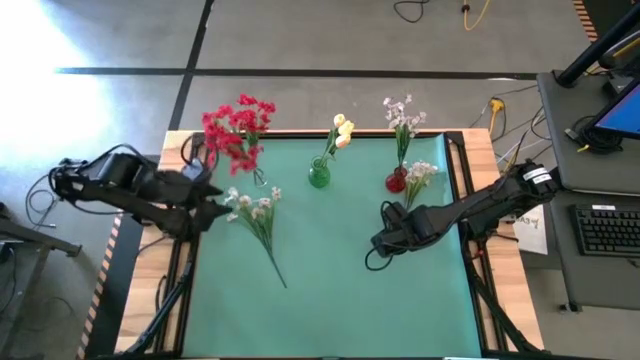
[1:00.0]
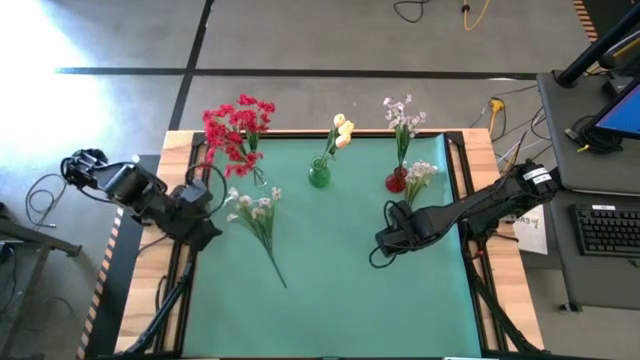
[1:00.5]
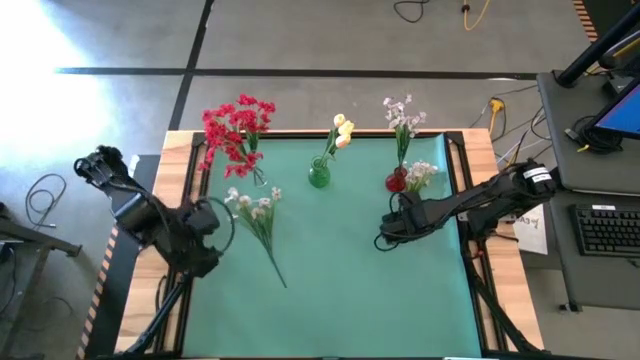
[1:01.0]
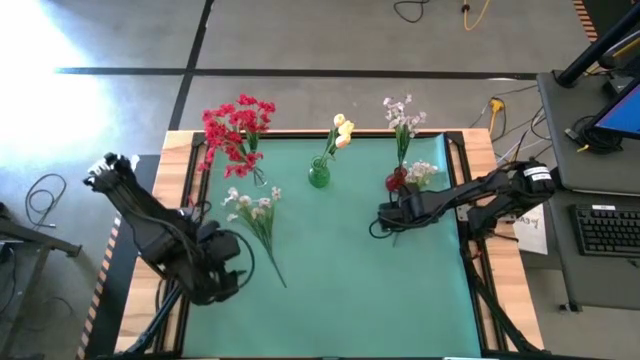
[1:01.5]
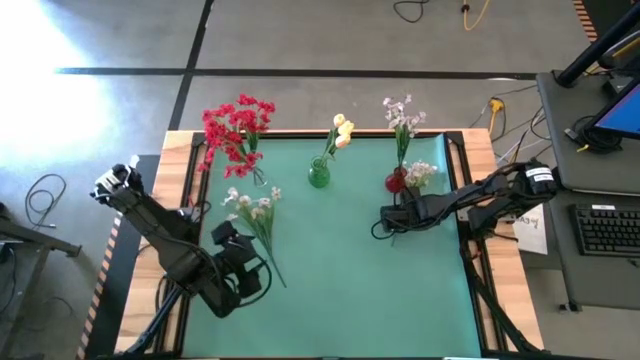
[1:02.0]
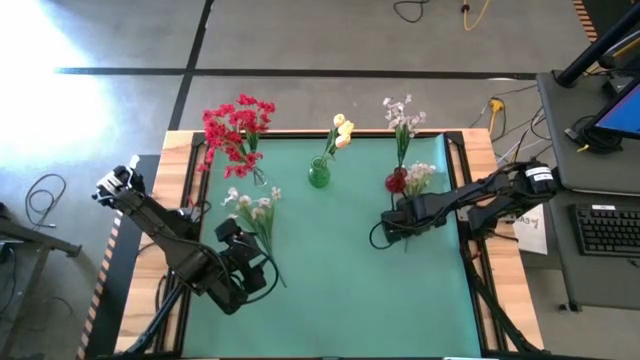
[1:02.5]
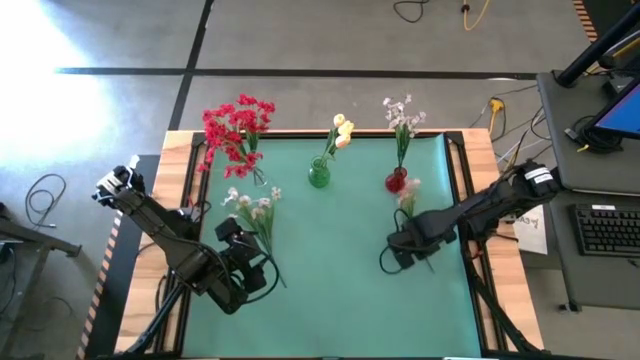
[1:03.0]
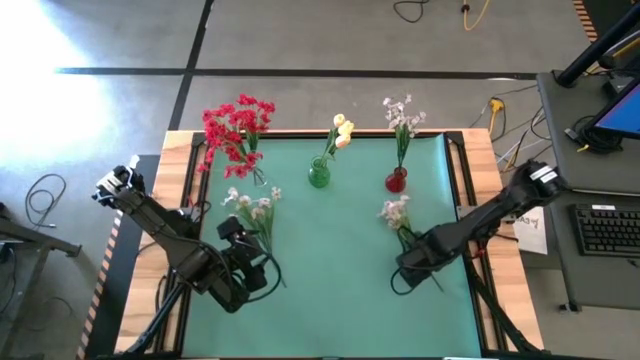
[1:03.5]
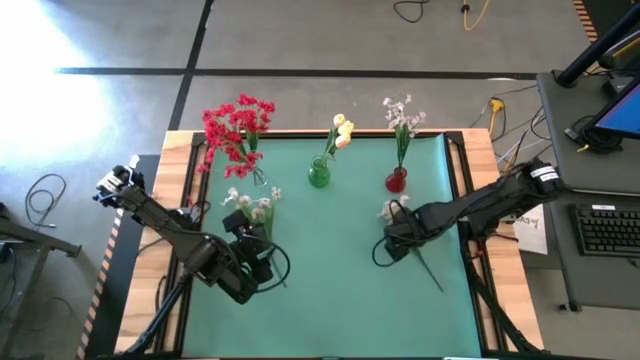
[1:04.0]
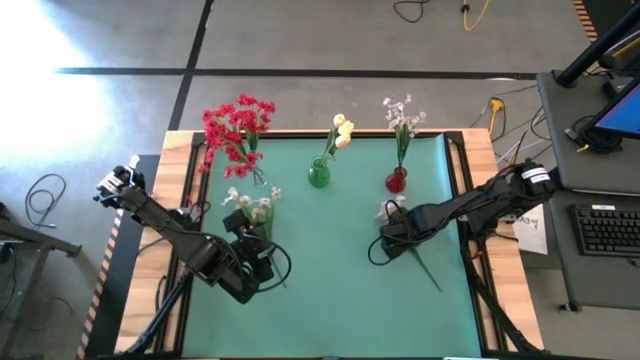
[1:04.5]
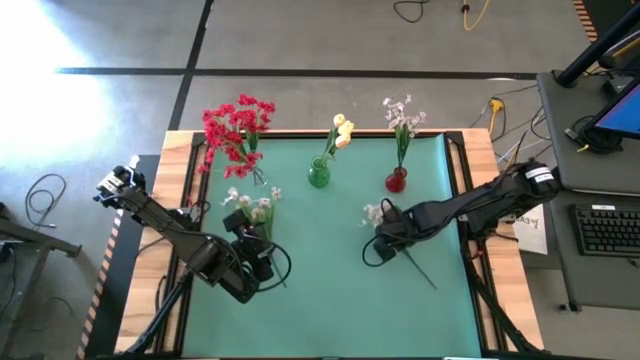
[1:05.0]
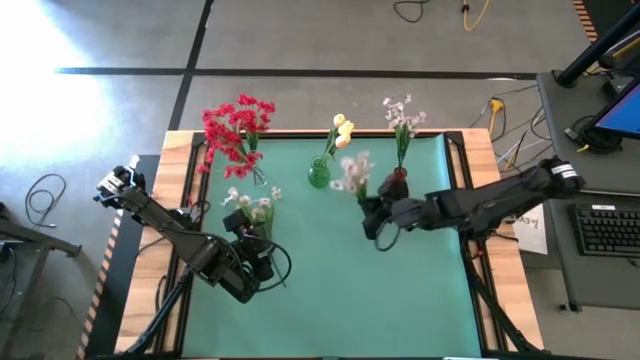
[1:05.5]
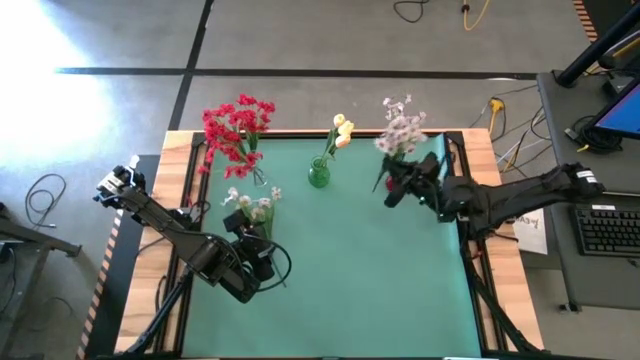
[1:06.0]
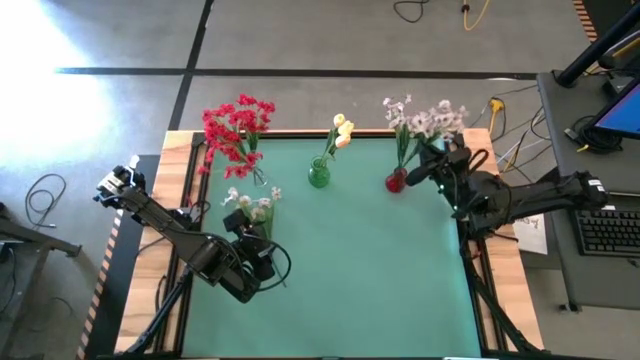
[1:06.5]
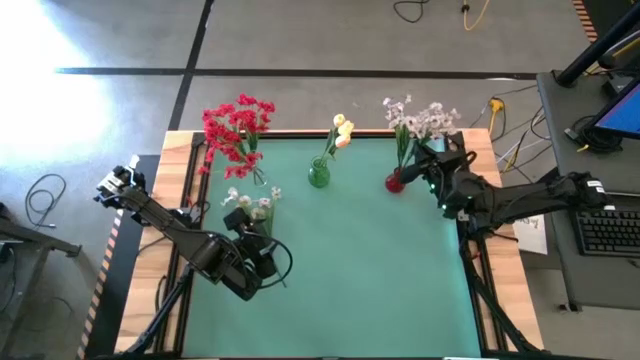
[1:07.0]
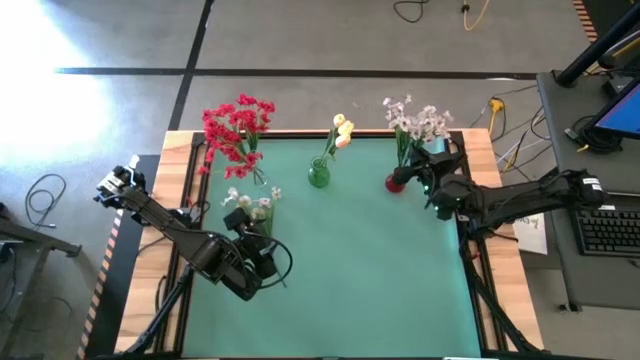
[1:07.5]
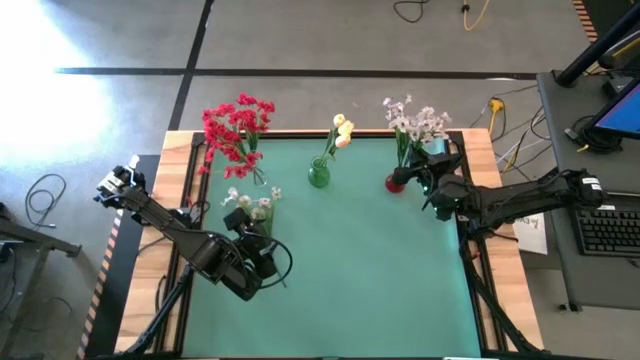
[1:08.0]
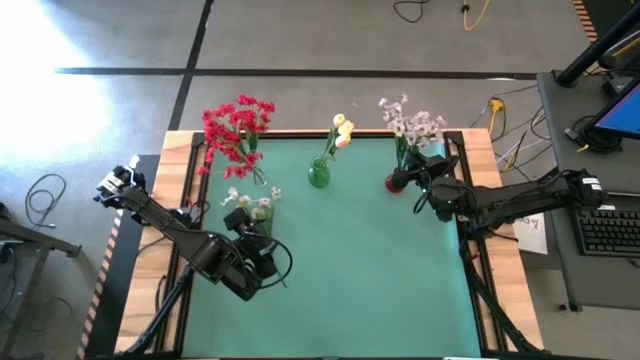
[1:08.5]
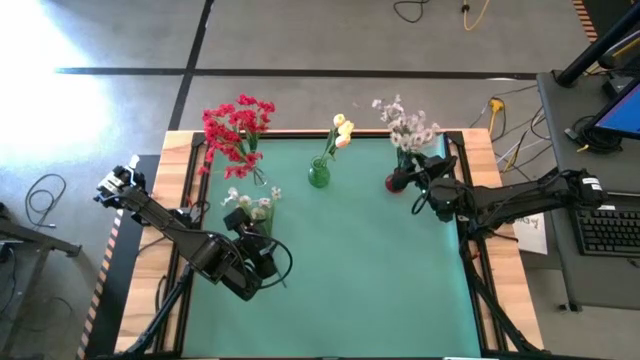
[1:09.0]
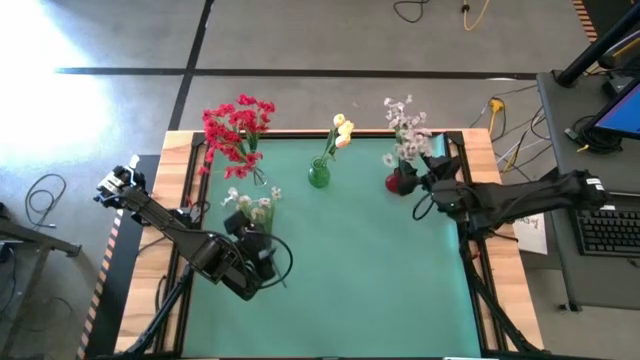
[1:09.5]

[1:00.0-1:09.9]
Task: Sort flowers into vase by color
Put the right white flowers into the red vase

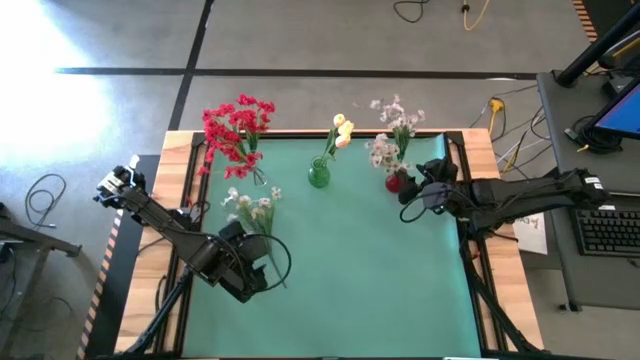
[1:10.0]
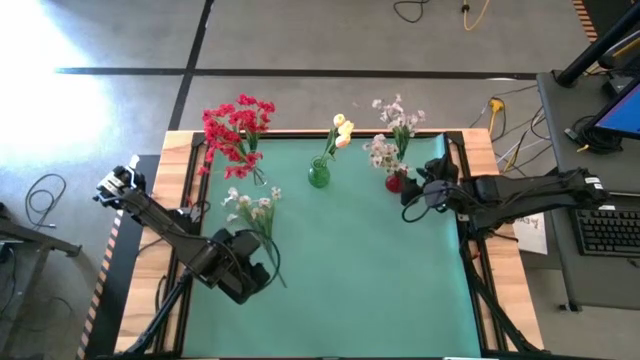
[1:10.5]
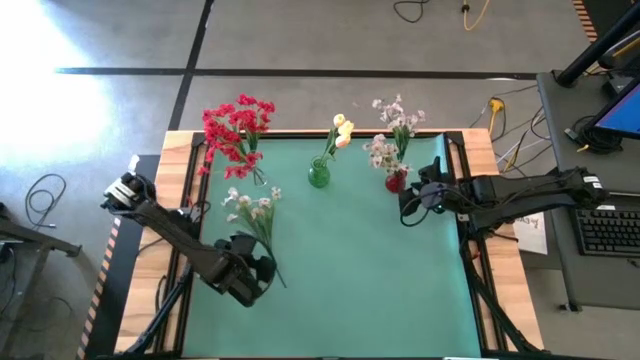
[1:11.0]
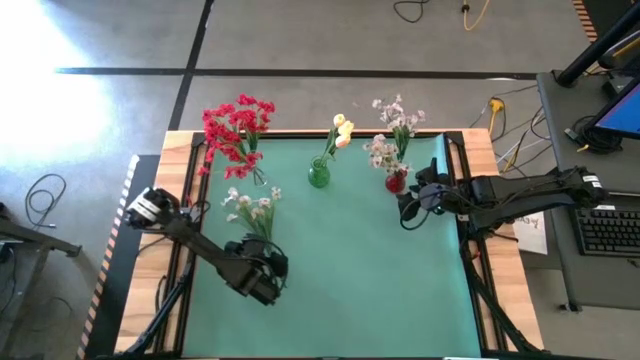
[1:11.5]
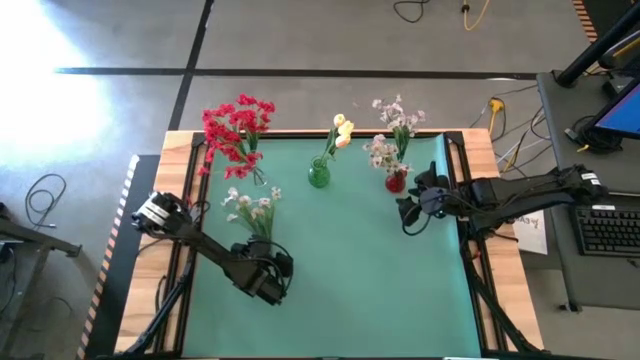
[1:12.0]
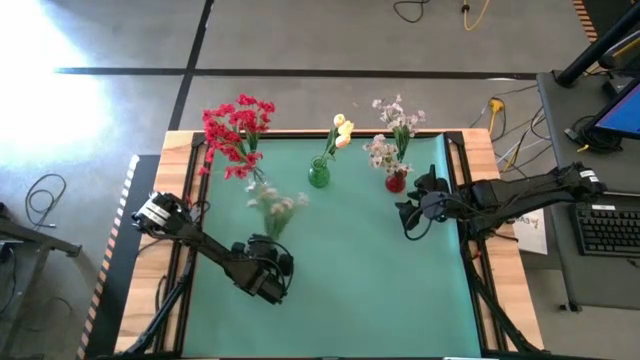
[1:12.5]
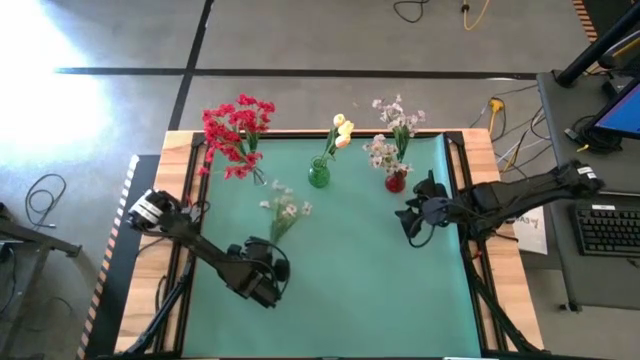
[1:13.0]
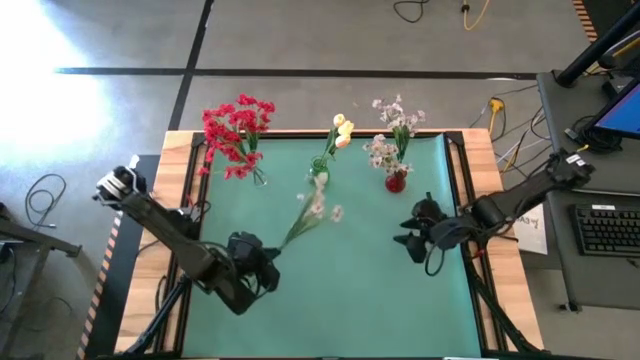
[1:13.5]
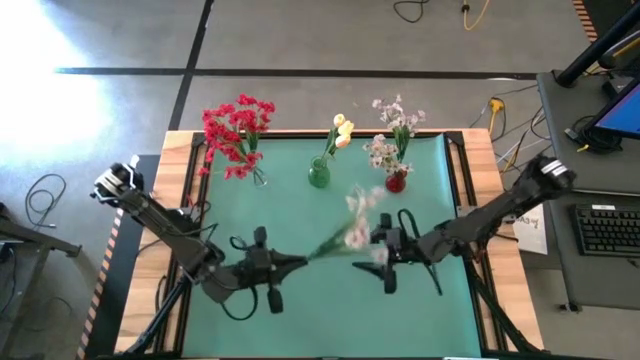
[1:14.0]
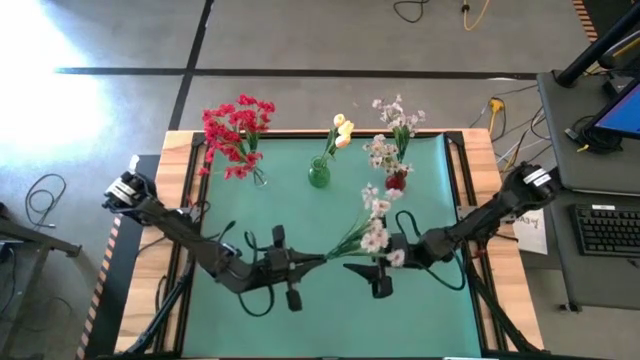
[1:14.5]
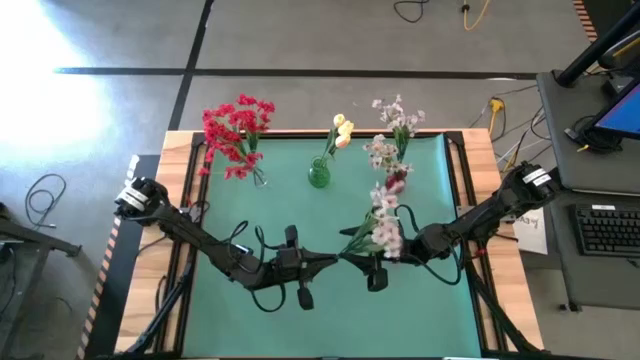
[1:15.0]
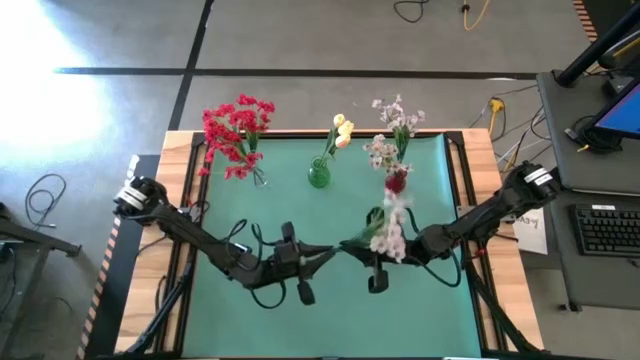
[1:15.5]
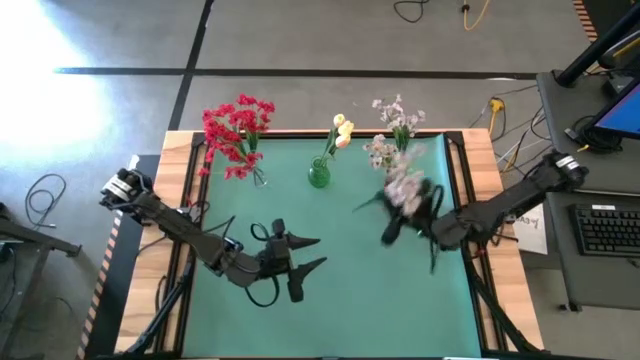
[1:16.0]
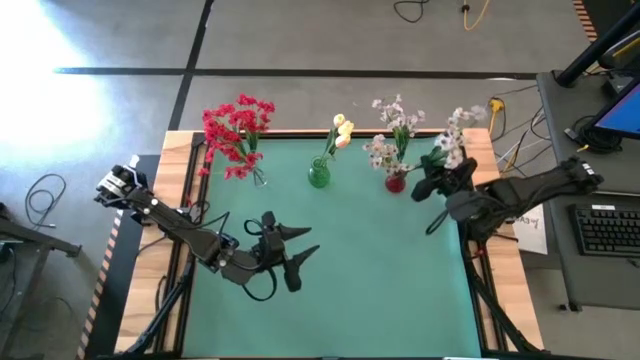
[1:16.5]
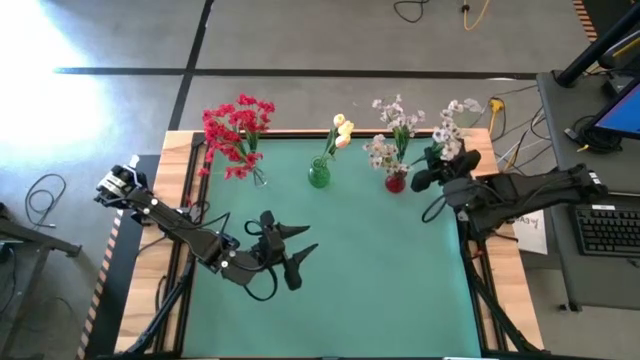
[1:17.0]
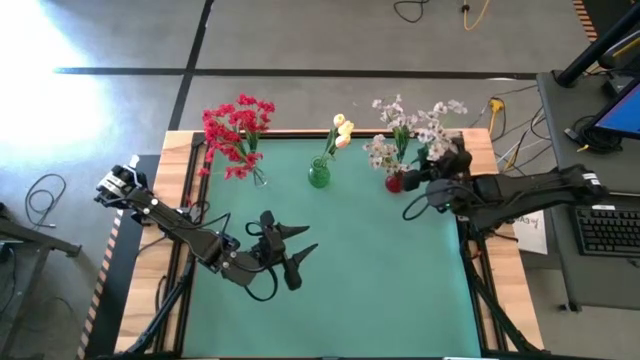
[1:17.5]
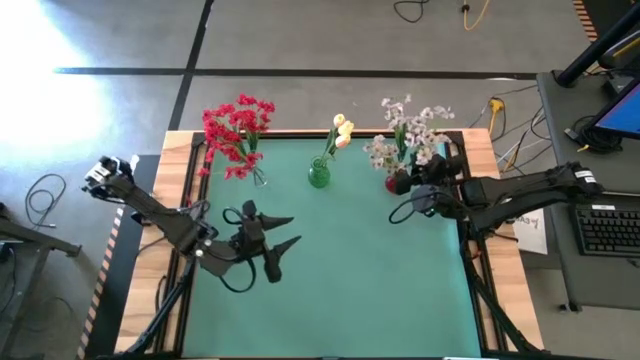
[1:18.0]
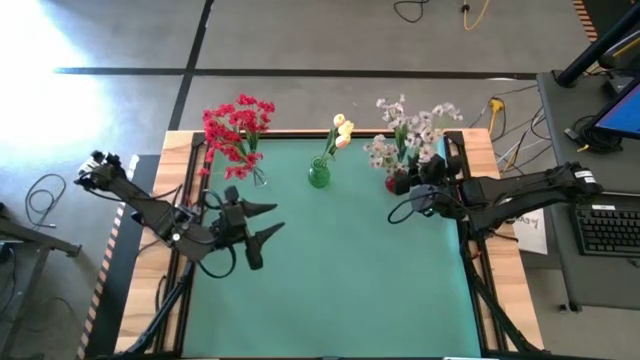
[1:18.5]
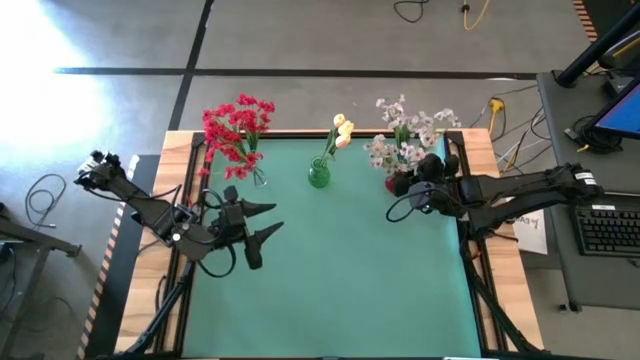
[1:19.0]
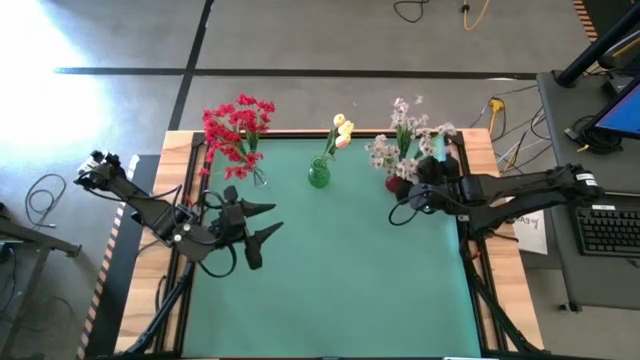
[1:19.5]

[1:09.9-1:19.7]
Put the white flowers into the red vase

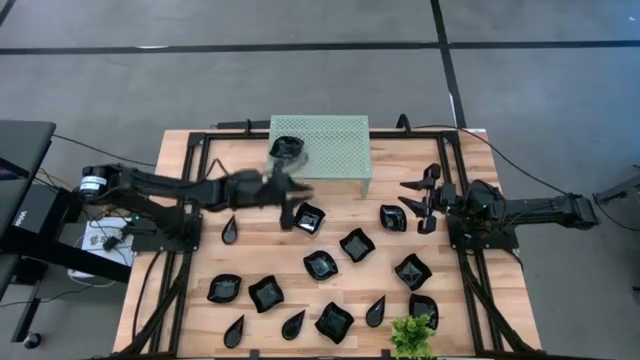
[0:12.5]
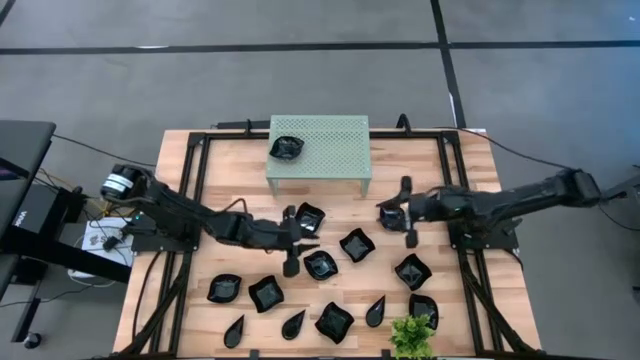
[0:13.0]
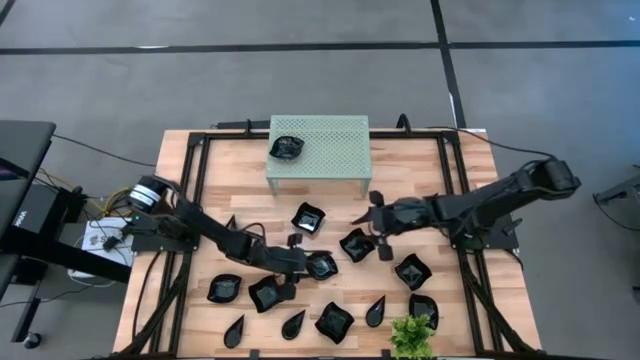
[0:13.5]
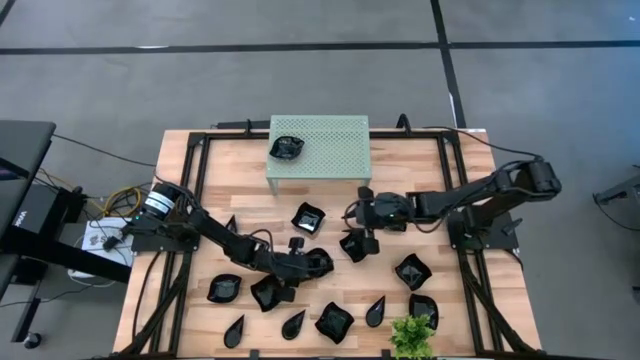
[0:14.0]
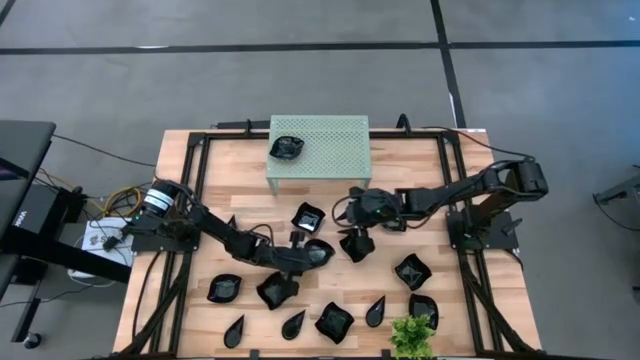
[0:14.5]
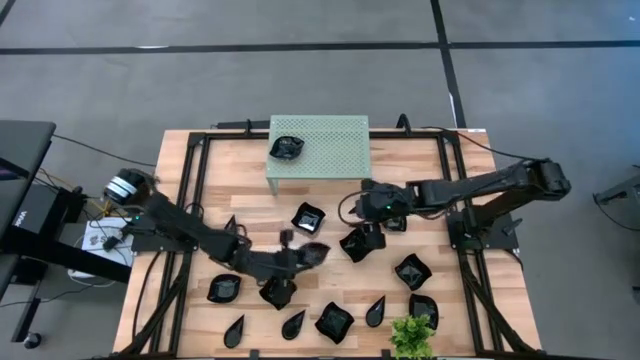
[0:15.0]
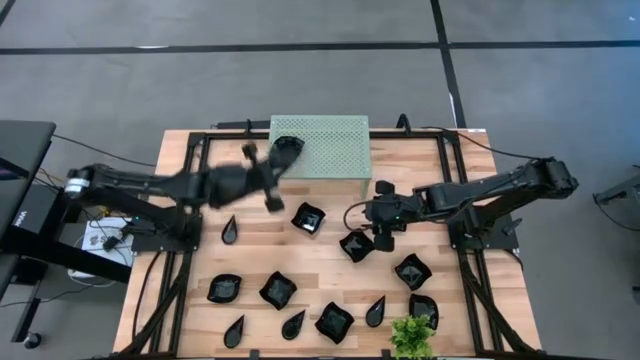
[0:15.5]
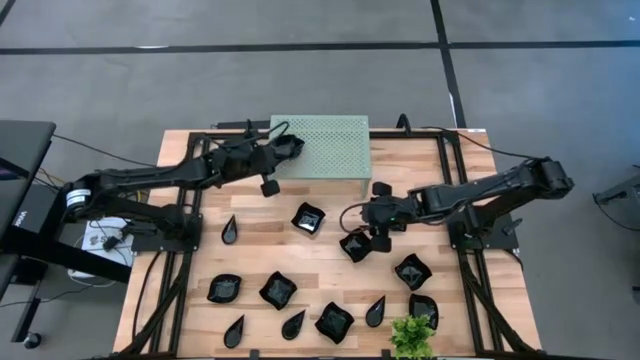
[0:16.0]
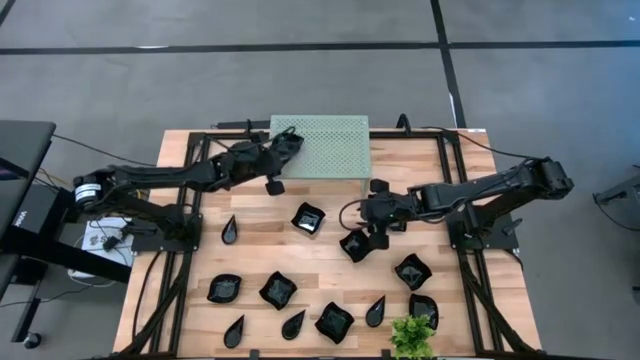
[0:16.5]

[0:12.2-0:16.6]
Task: Pick & Place Mini shaped plates
Stack the leaf-shaped plate on top of the other leaf-shaped plate on the shelf
